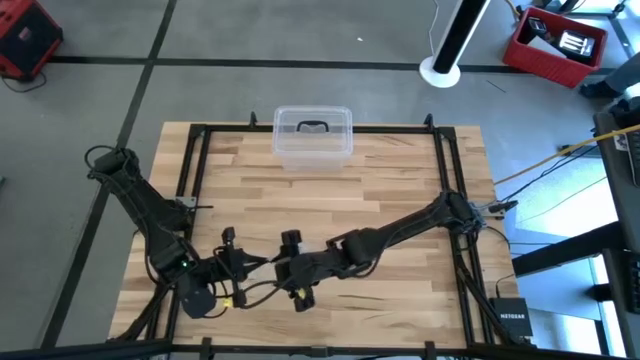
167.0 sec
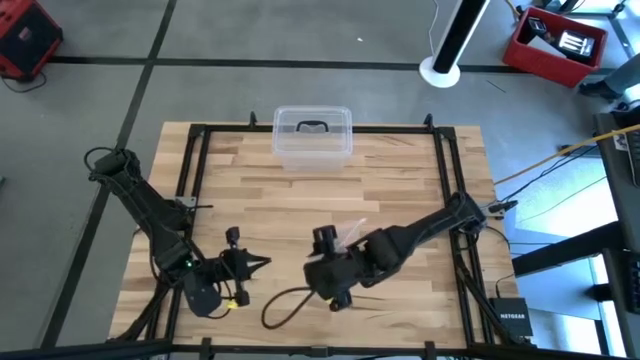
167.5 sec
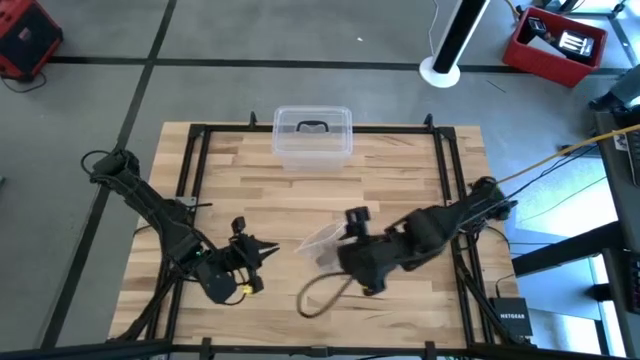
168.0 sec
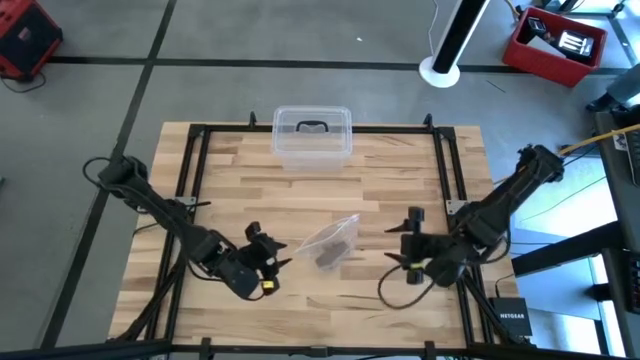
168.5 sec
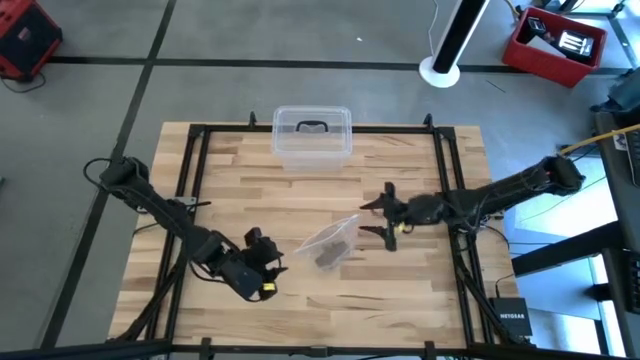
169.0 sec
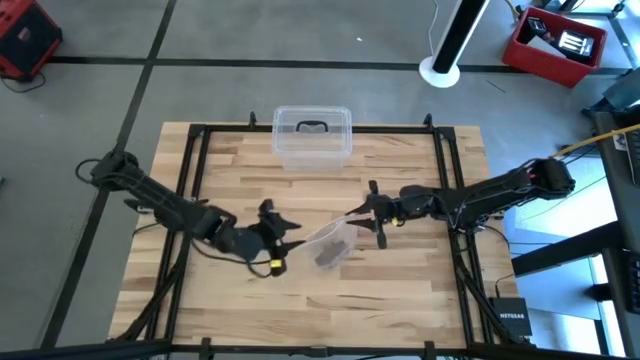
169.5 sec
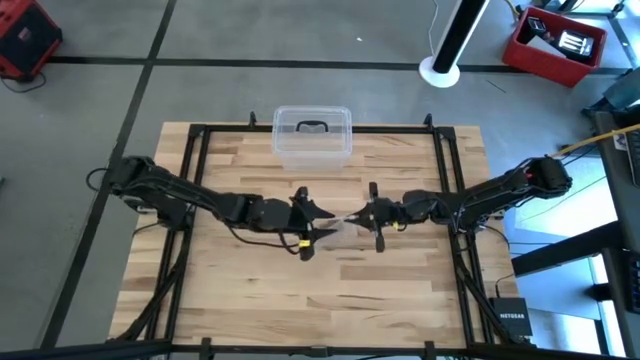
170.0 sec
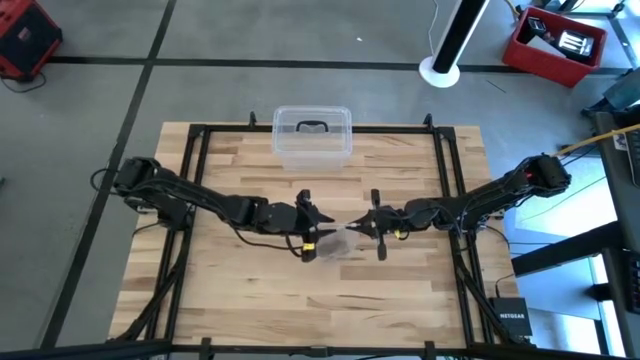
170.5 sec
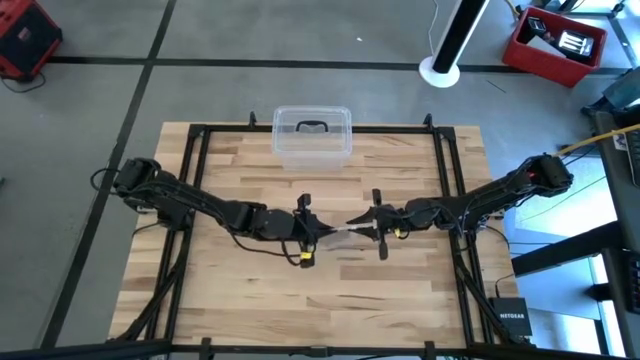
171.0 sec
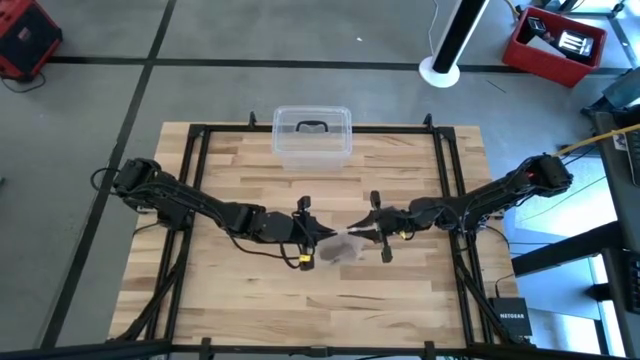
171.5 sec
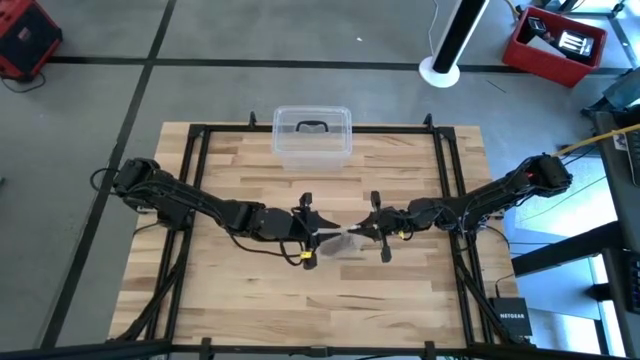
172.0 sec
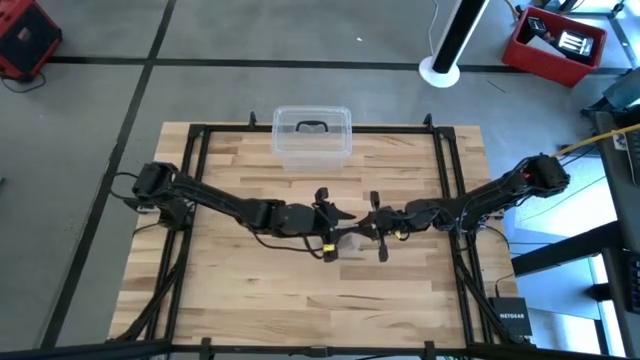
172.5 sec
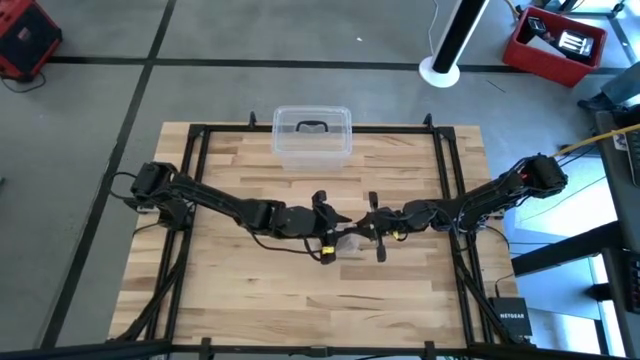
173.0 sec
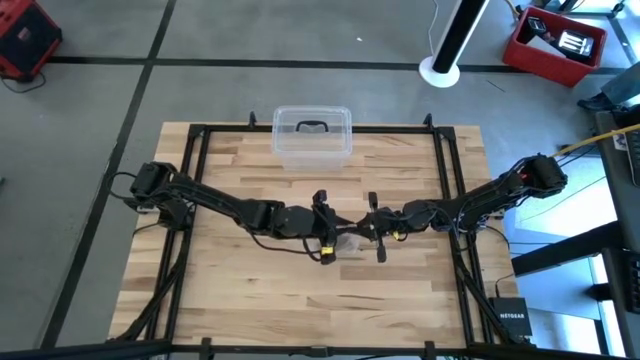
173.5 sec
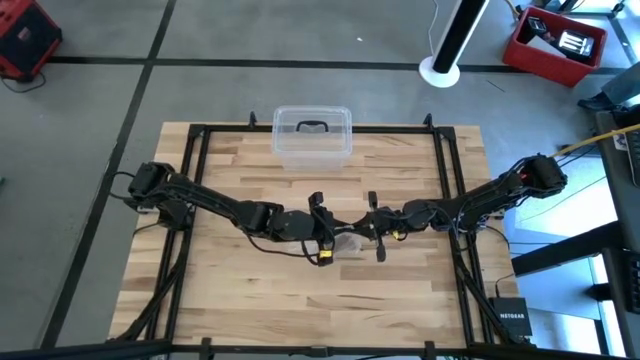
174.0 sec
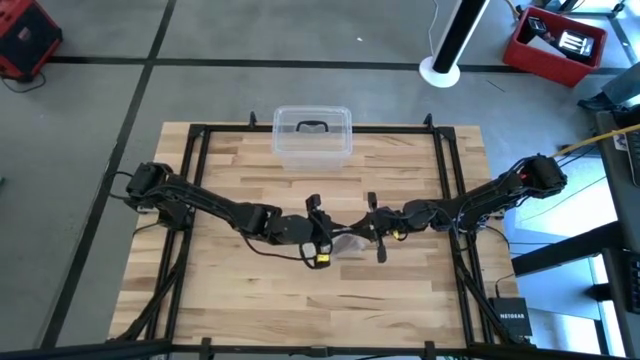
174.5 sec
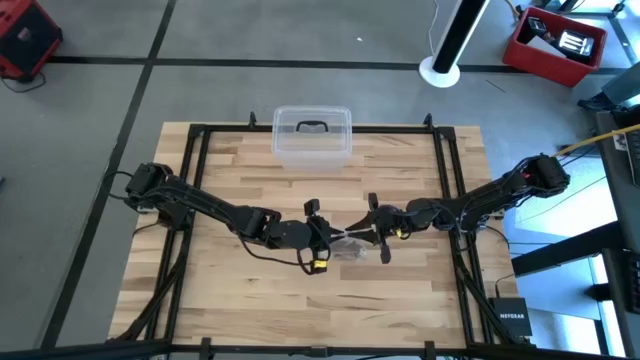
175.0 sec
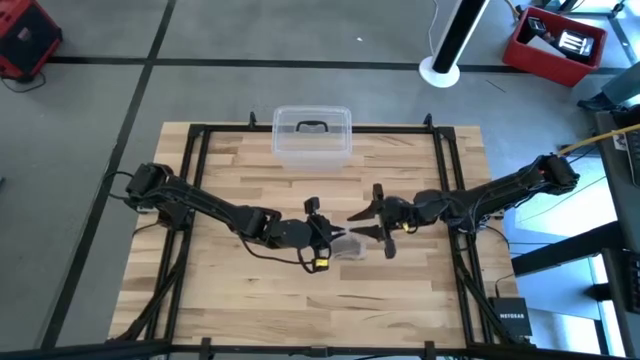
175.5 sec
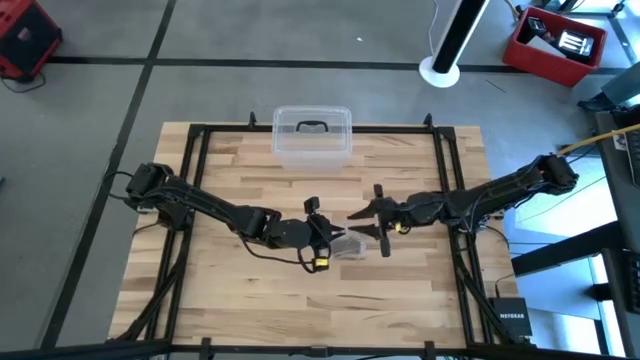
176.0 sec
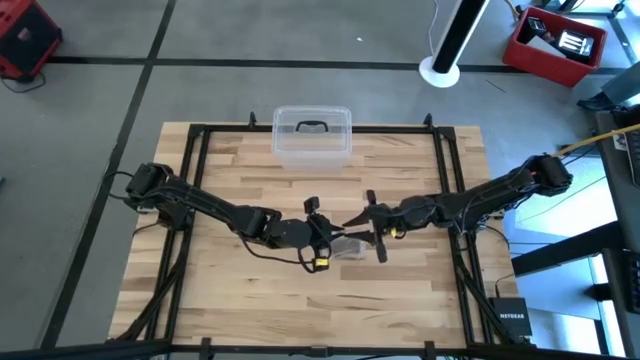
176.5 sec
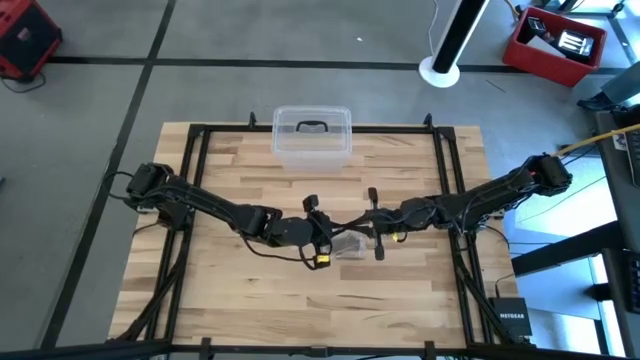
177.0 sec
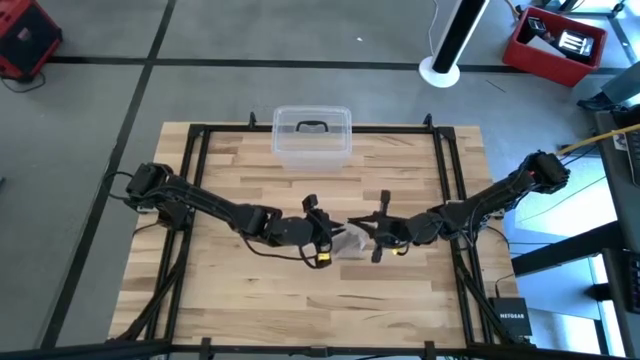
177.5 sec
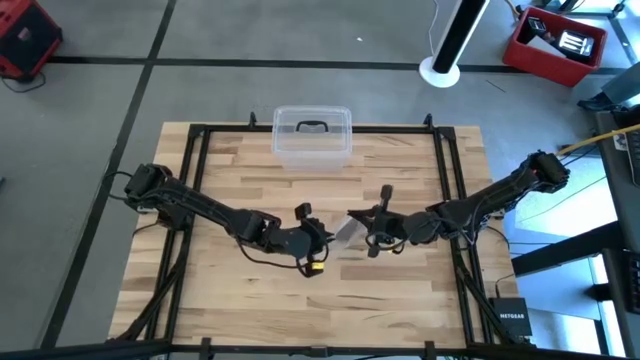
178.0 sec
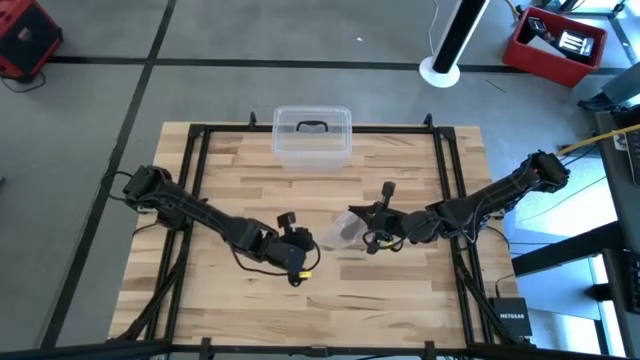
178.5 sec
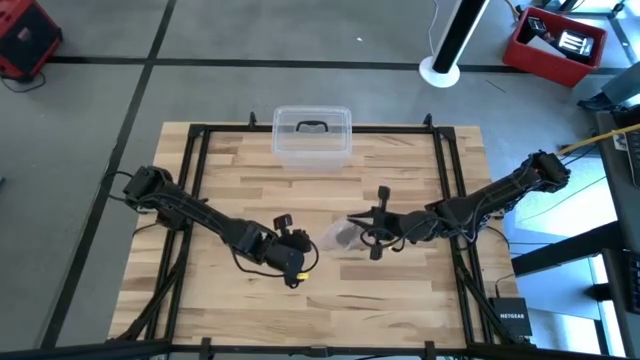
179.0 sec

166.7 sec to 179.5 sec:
Task: Roll bandage
Close the transparent zip bag

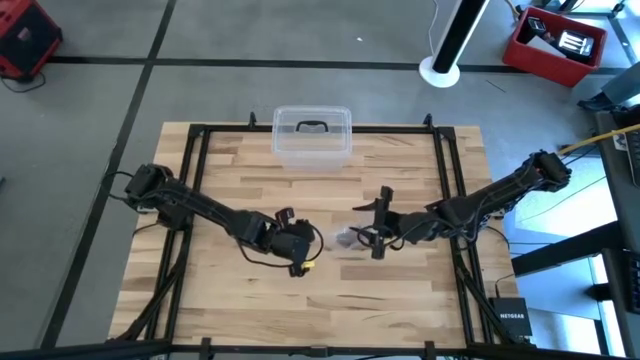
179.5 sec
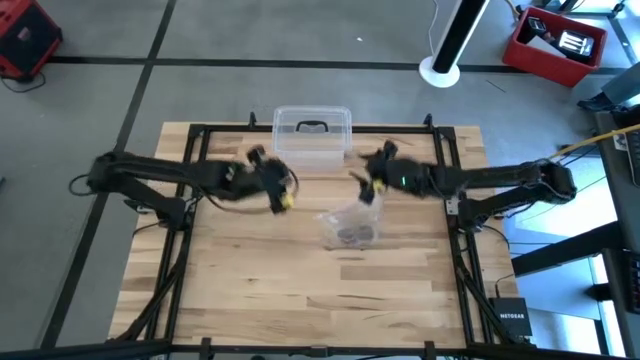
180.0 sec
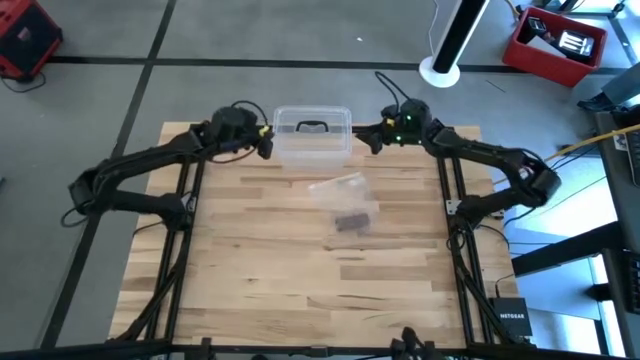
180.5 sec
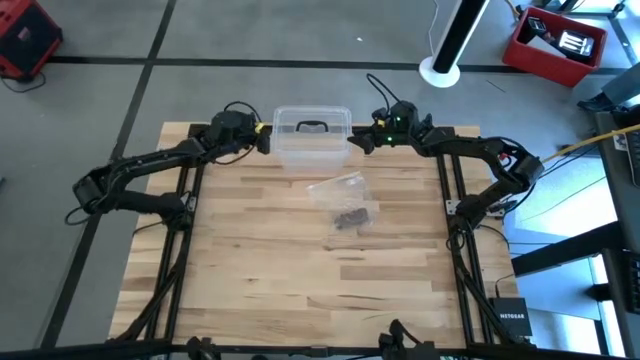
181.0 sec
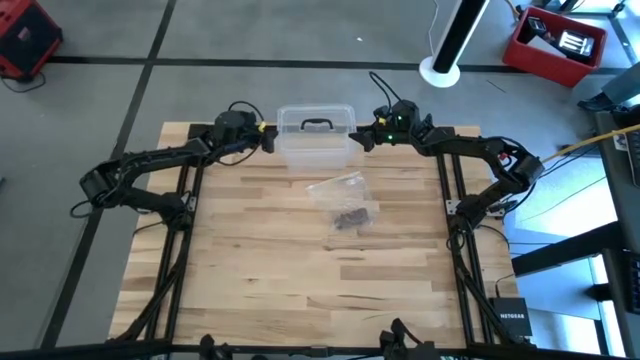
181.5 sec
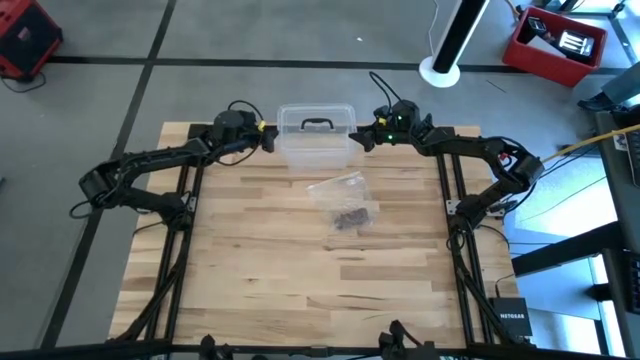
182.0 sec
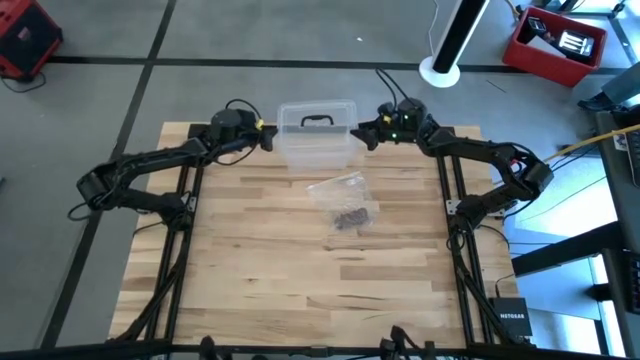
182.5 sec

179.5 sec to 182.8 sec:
Open the transparent container

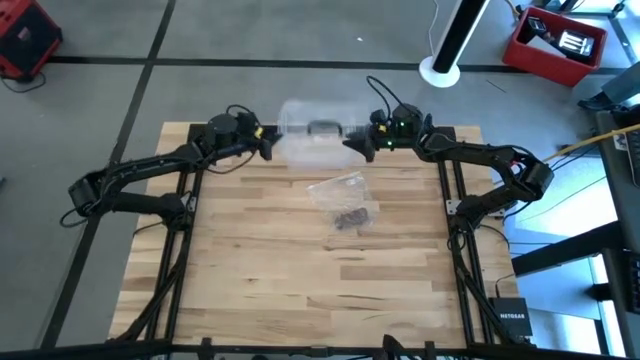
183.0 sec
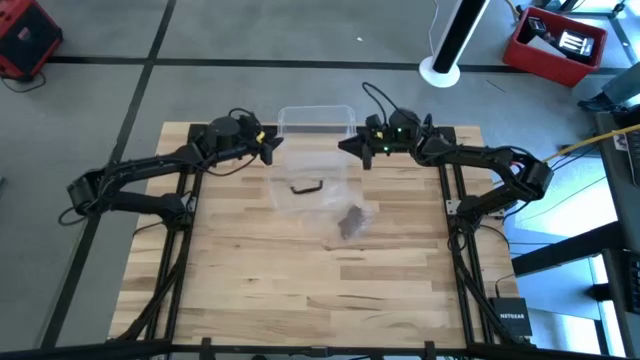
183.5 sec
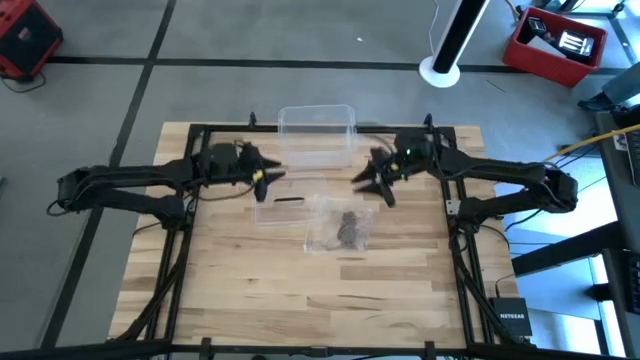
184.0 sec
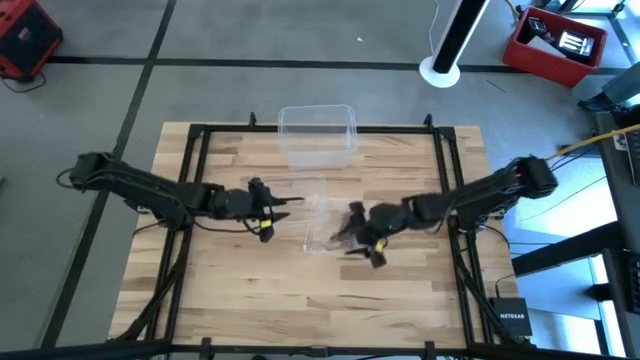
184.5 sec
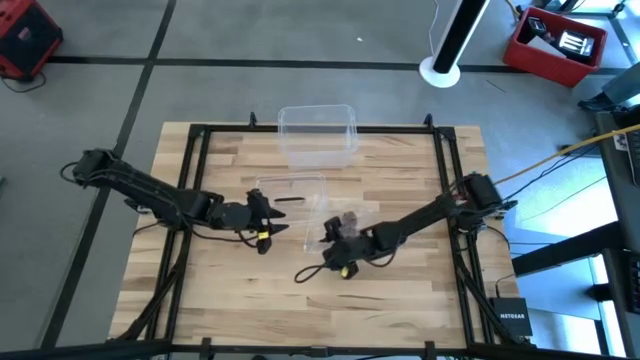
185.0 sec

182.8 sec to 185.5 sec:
Put the transparent zip bag containing the rolled brown bandage into the transparent container

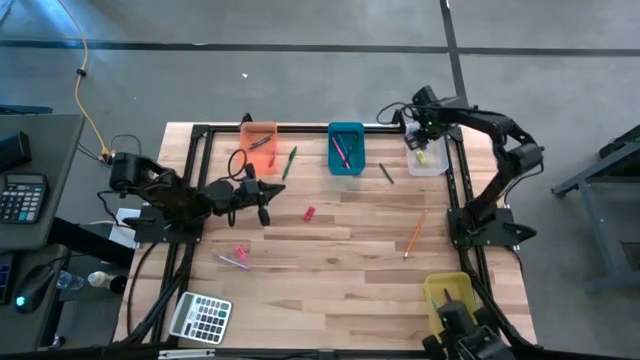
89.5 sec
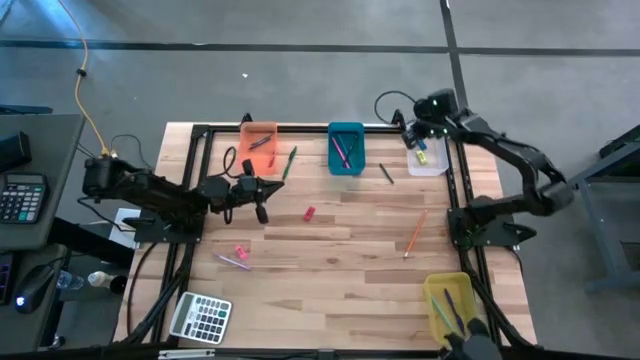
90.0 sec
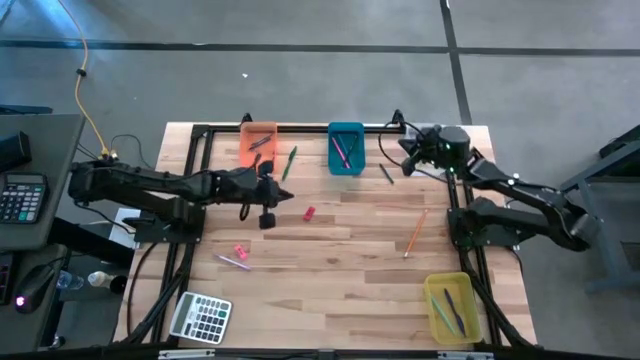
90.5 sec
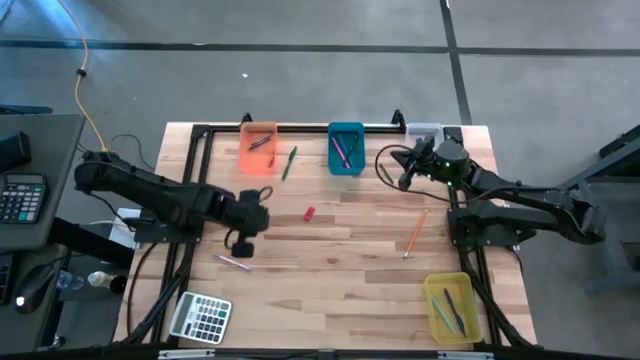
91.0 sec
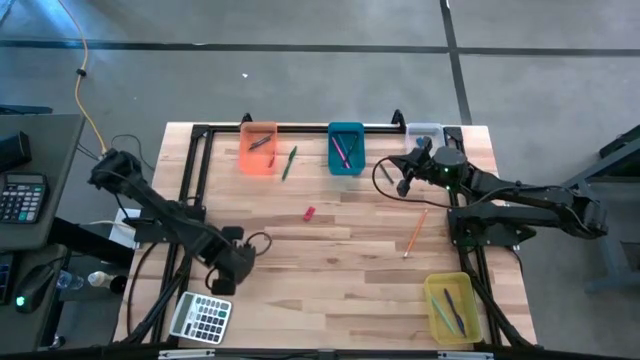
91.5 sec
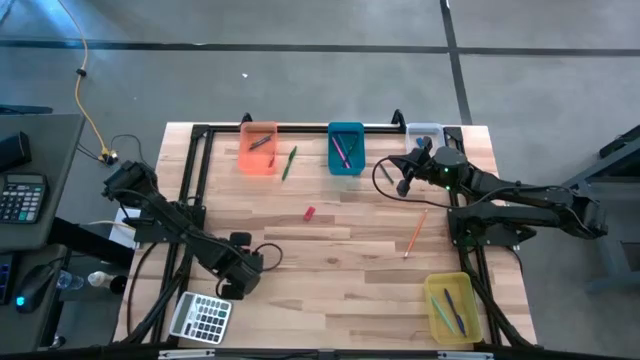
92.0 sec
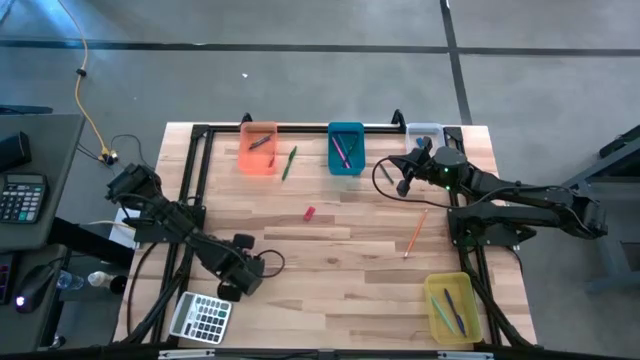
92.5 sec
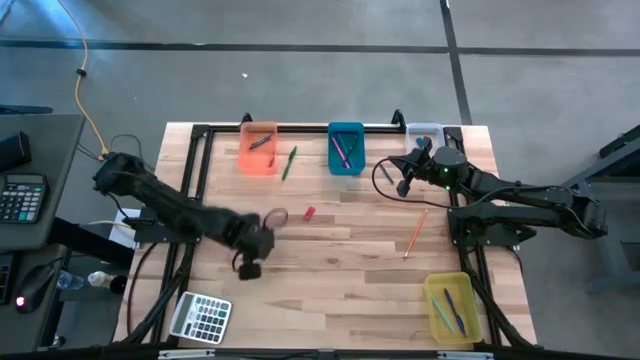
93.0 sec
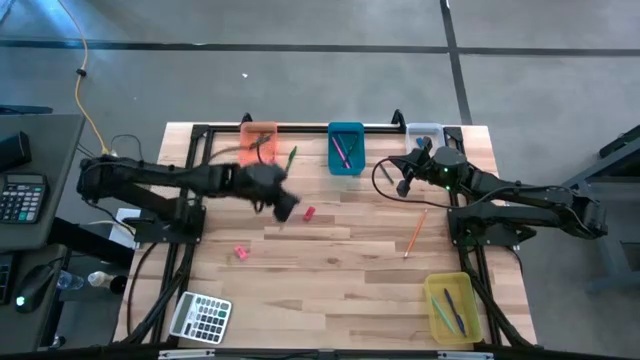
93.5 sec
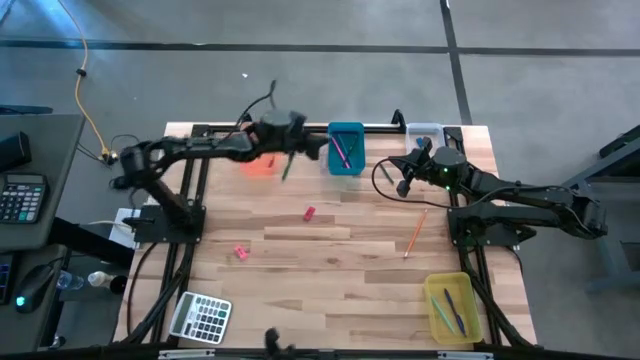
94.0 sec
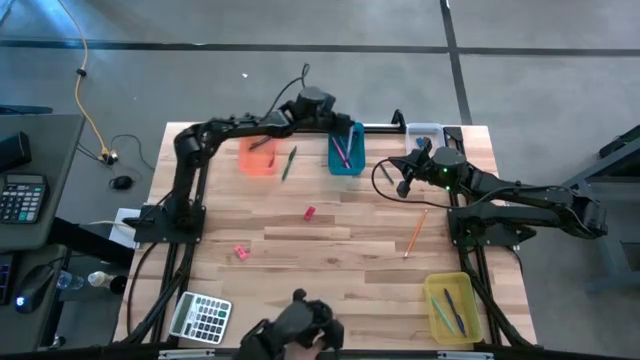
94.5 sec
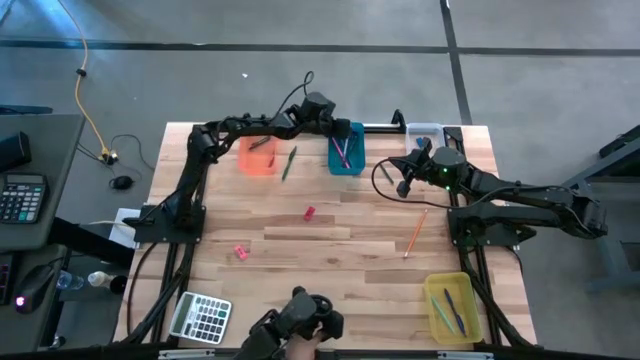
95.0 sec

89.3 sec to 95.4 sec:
Task: Sort crayons/erasers/pens/pencils in bins
Put the purple pen into the yellow transparent bin
